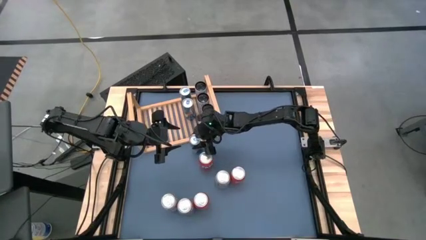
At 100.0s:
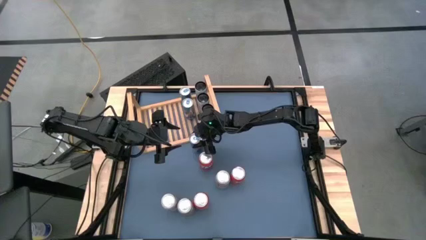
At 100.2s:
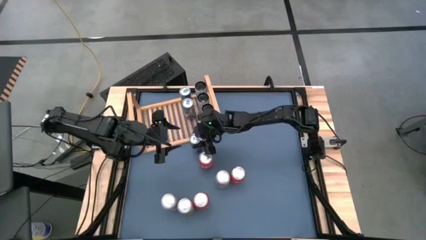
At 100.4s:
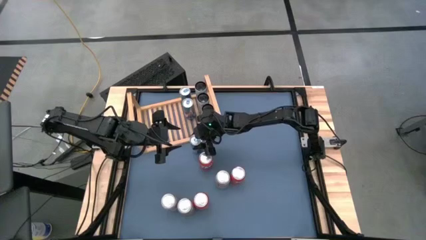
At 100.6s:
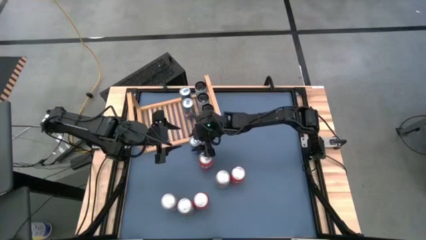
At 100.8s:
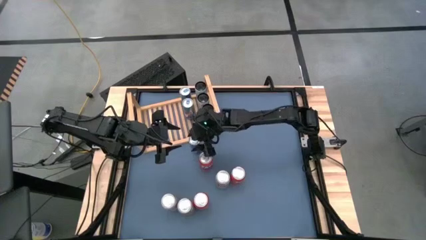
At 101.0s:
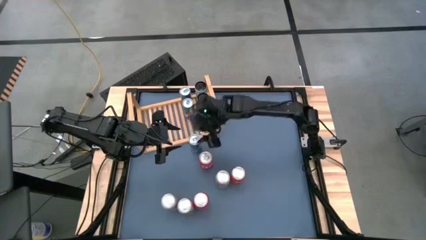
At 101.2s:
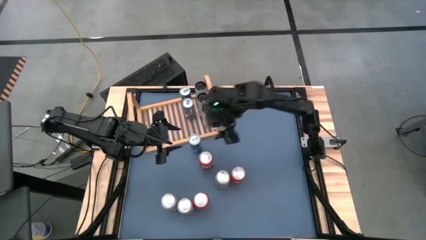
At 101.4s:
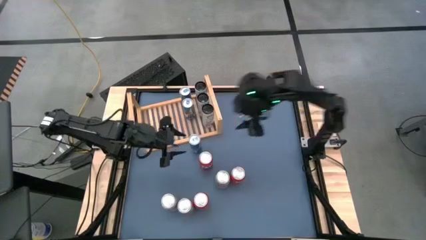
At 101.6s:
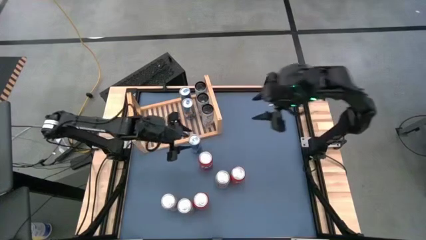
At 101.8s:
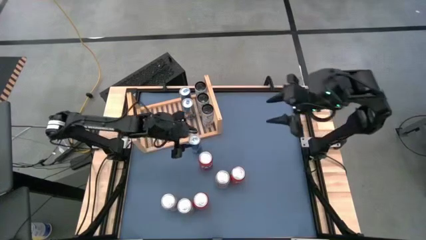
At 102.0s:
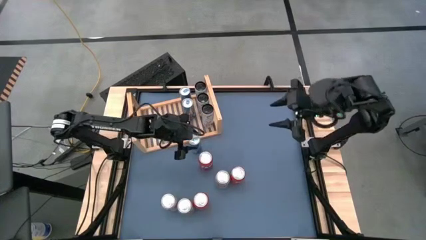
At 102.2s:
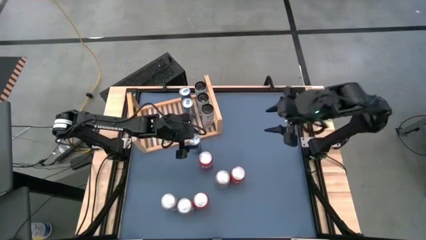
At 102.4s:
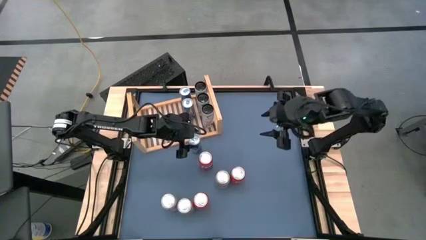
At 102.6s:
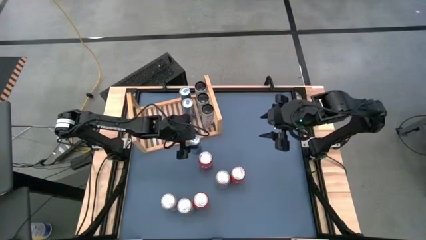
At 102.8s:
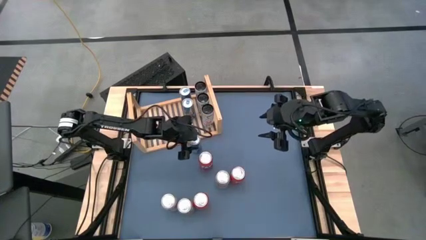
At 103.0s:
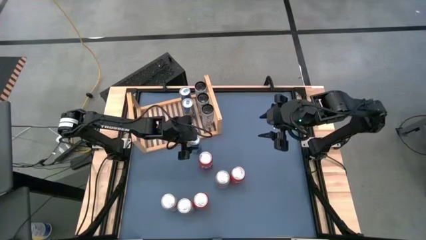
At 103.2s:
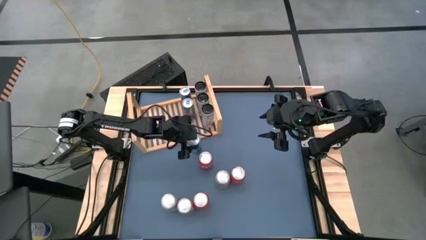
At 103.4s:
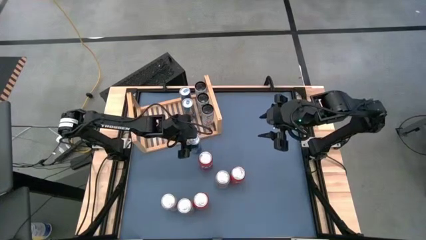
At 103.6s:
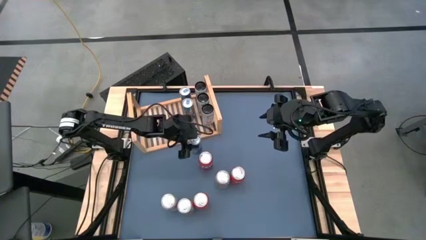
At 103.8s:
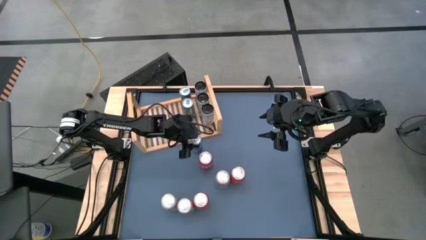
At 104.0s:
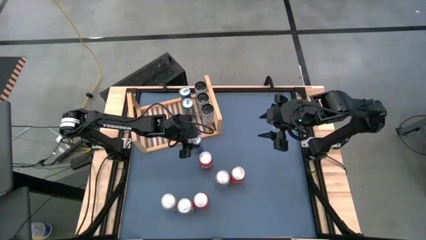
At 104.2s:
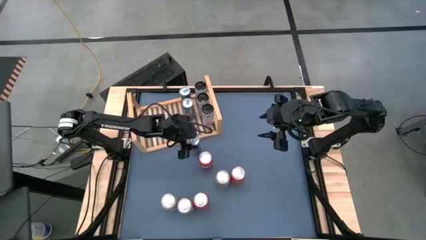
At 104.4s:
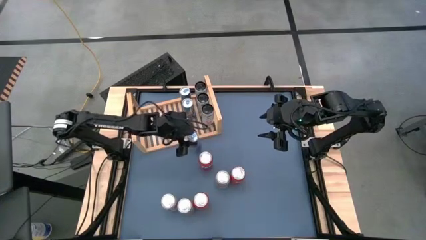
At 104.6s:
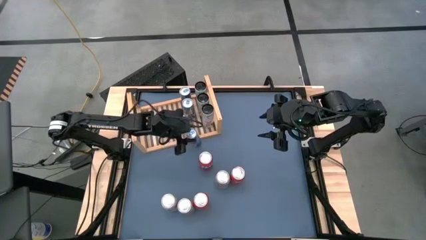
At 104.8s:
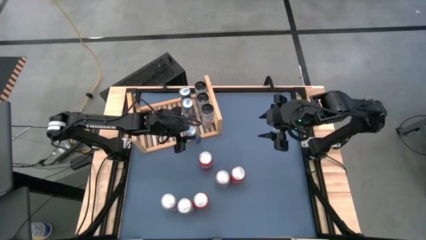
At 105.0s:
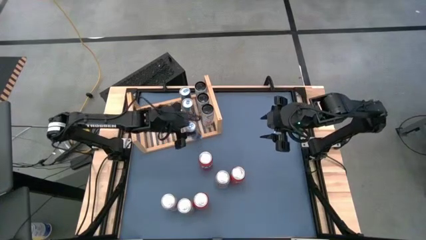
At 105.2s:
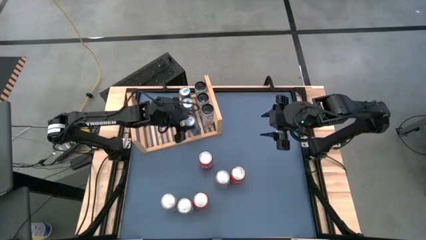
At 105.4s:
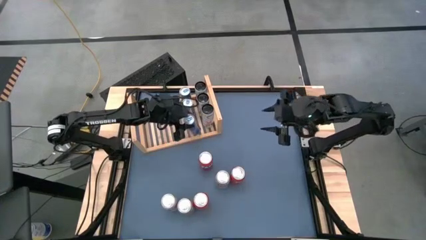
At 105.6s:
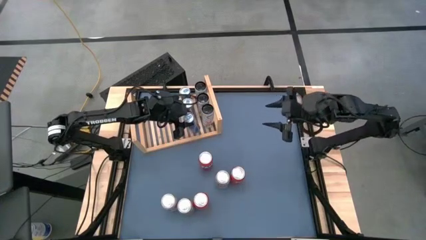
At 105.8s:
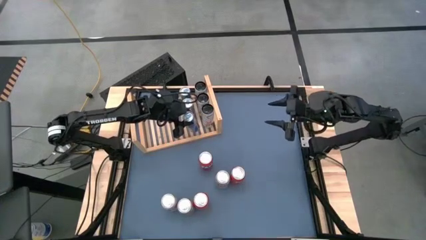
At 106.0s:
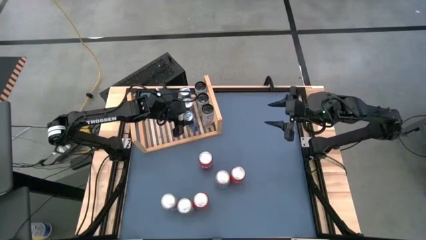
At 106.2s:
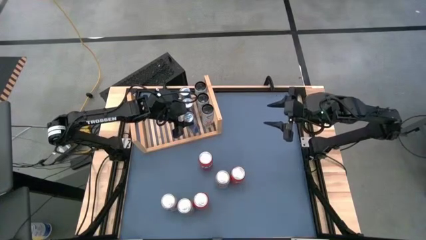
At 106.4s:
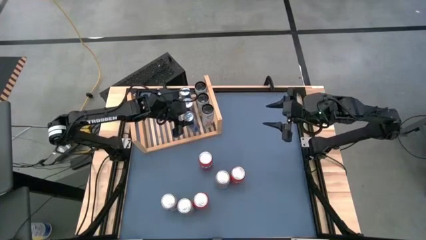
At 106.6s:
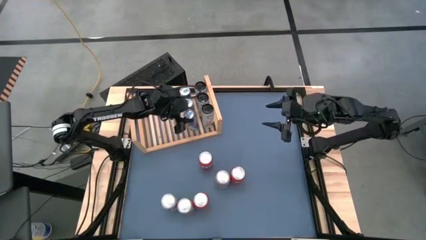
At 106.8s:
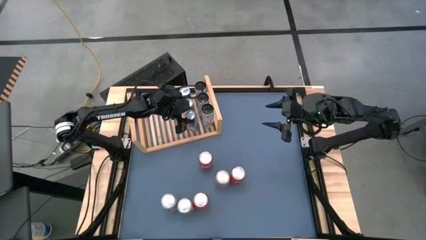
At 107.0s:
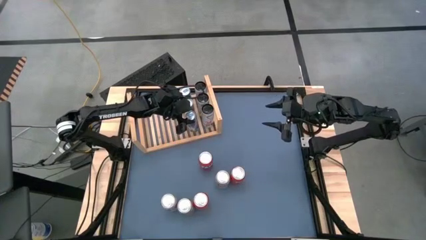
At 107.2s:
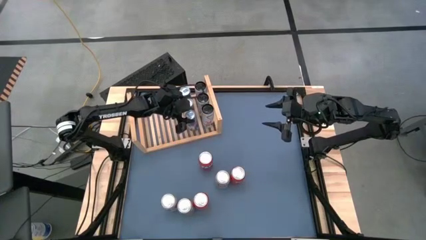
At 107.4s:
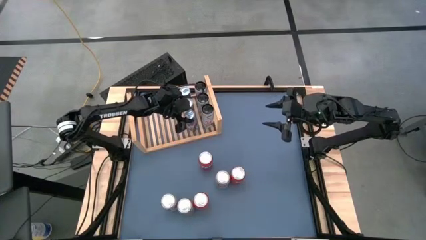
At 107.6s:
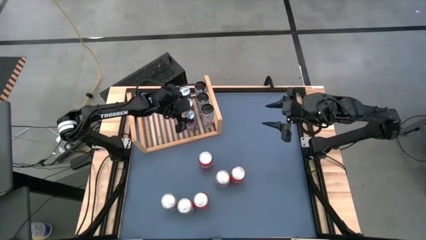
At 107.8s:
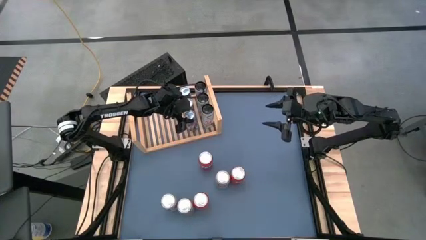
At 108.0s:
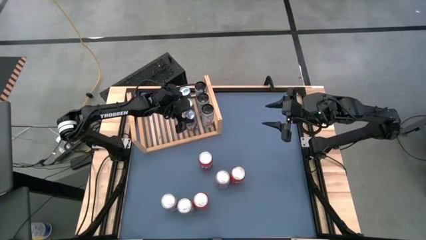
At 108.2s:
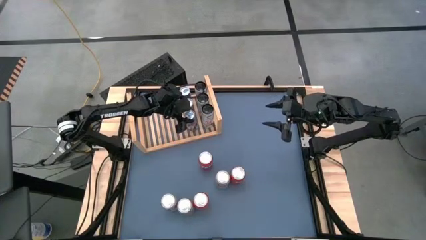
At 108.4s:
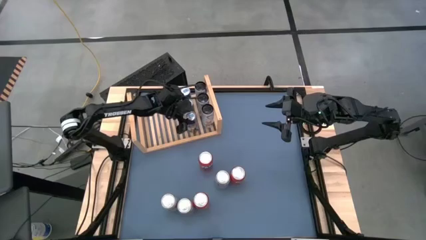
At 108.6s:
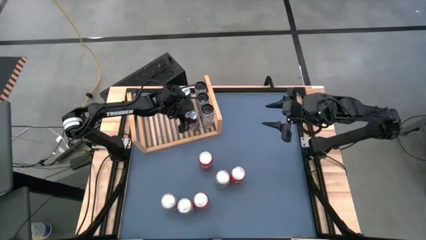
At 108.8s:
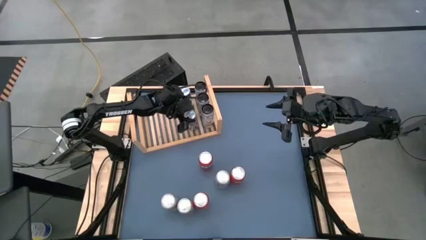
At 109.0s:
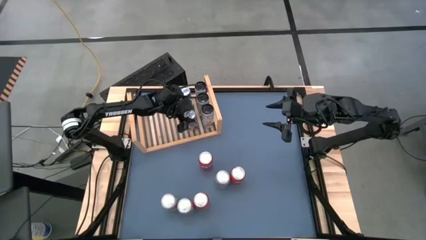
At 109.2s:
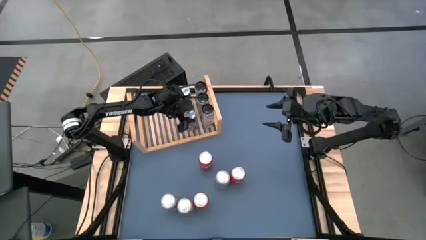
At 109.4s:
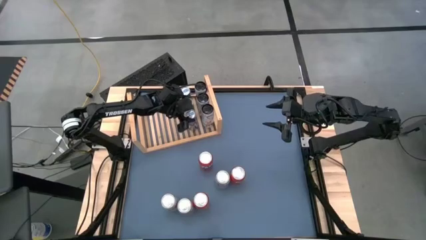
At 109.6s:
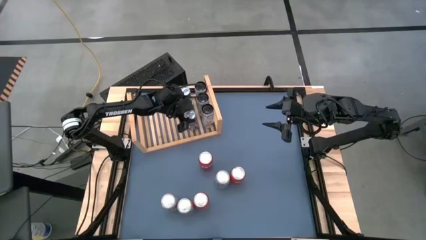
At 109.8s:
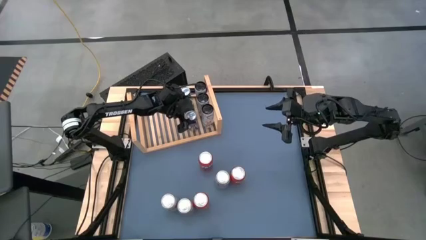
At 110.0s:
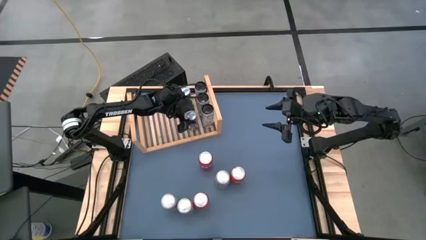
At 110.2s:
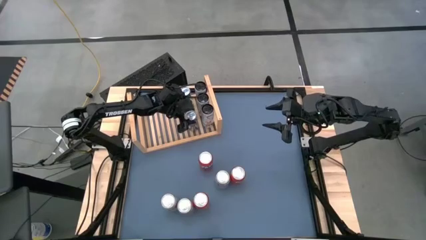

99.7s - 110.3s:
Task: Place canned beverage on shelf
Put the blue soda can on the shelf aligned with the other blue soda cans

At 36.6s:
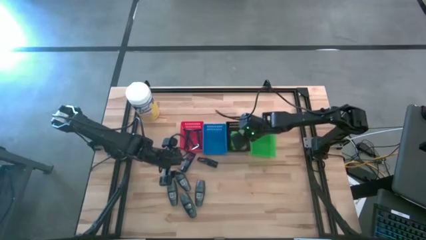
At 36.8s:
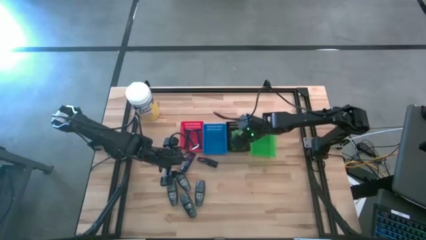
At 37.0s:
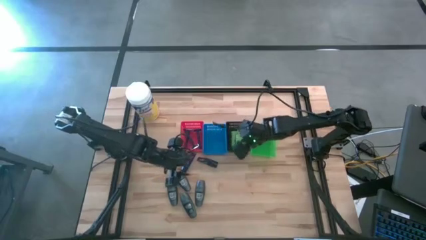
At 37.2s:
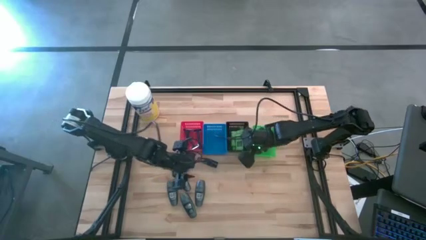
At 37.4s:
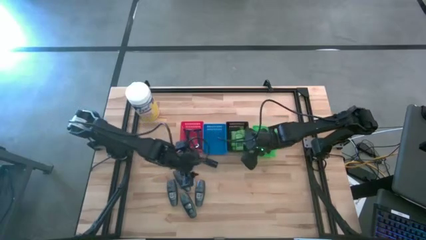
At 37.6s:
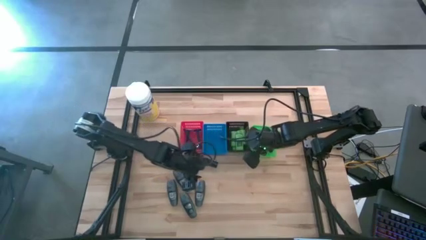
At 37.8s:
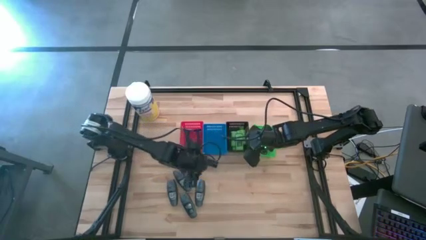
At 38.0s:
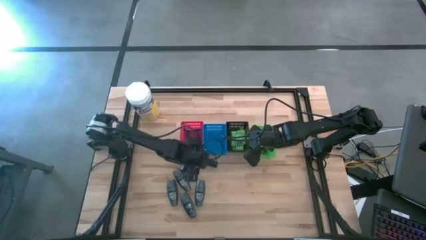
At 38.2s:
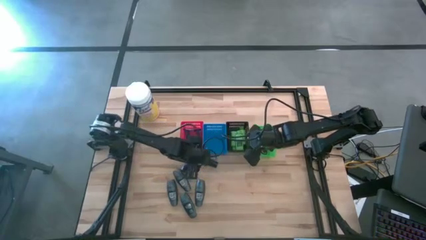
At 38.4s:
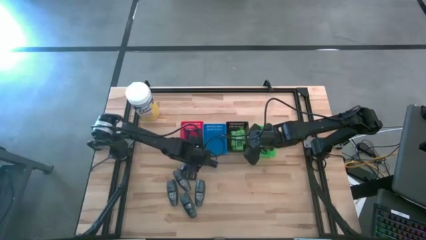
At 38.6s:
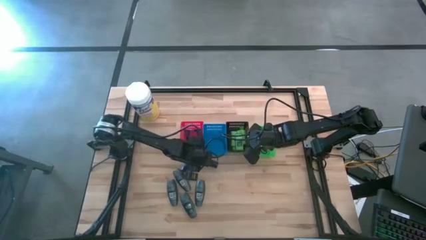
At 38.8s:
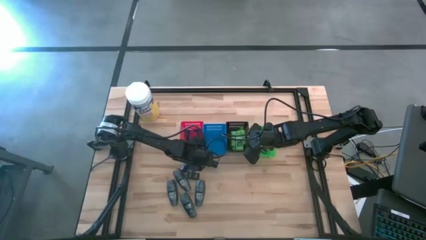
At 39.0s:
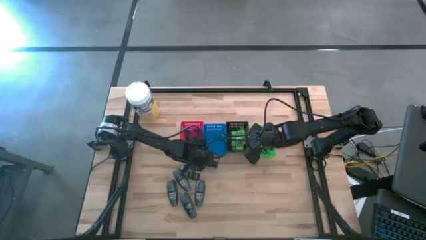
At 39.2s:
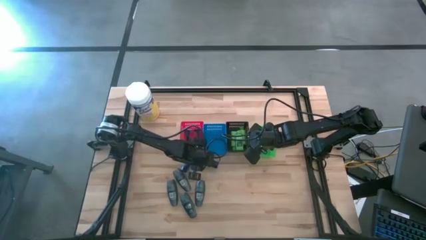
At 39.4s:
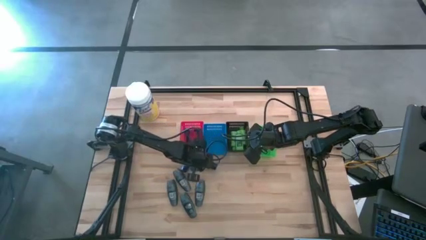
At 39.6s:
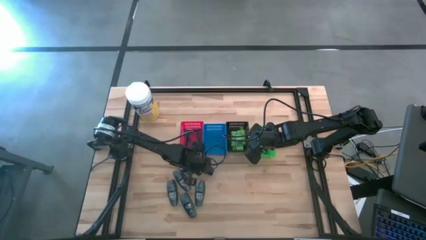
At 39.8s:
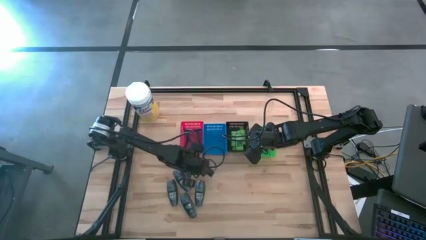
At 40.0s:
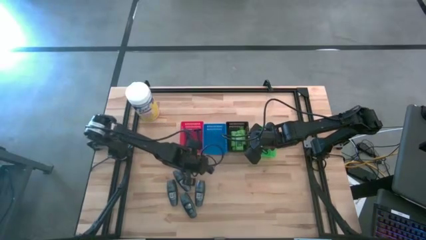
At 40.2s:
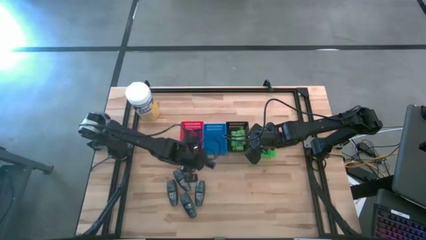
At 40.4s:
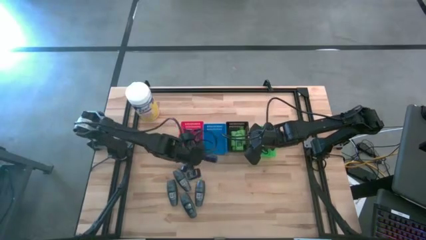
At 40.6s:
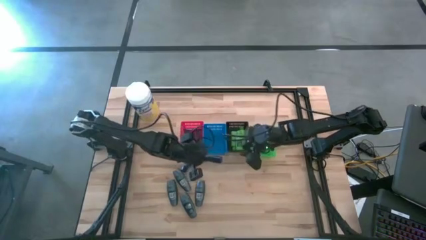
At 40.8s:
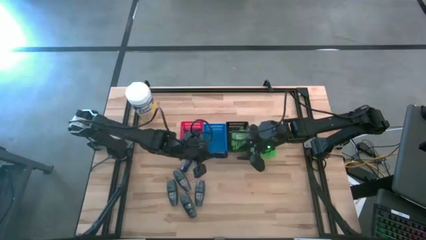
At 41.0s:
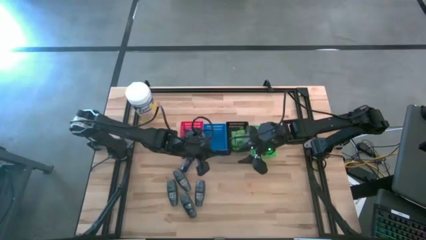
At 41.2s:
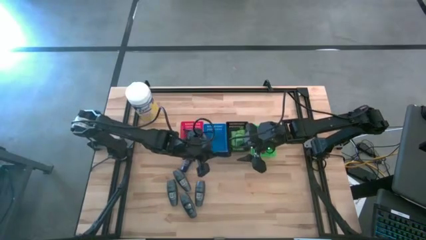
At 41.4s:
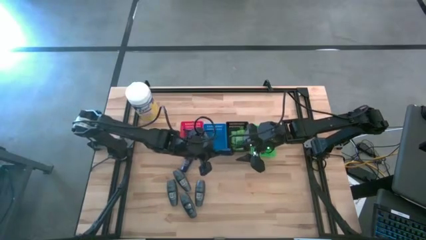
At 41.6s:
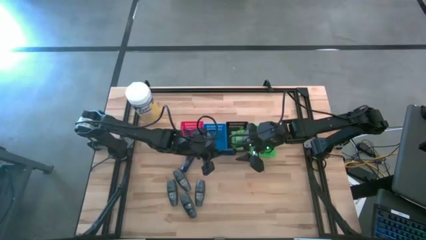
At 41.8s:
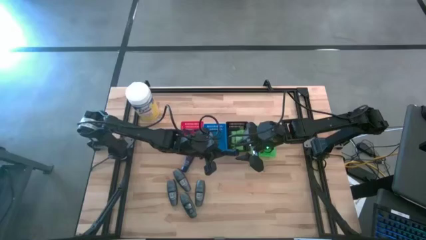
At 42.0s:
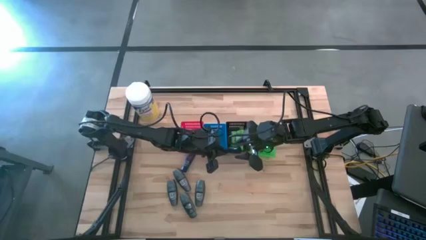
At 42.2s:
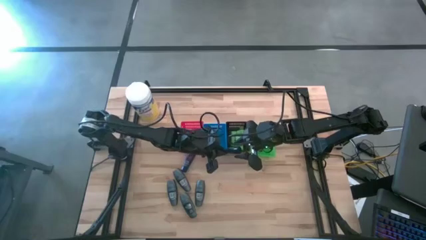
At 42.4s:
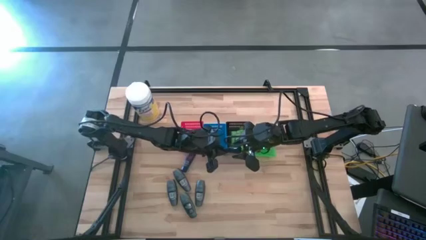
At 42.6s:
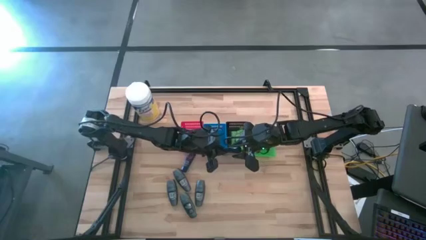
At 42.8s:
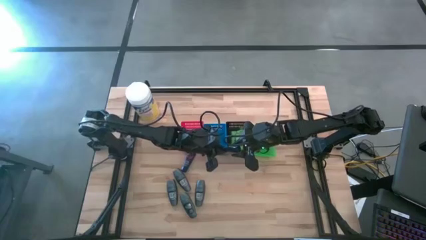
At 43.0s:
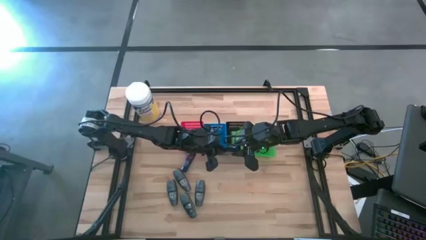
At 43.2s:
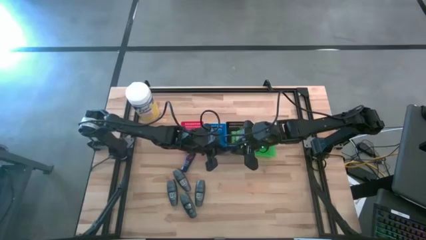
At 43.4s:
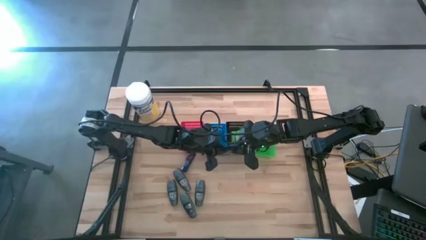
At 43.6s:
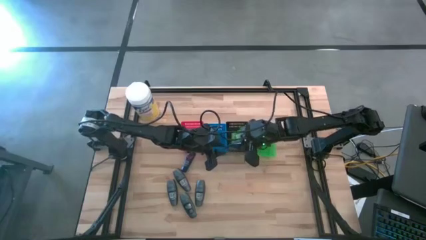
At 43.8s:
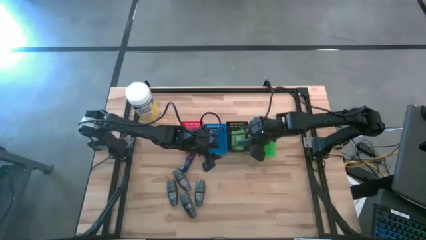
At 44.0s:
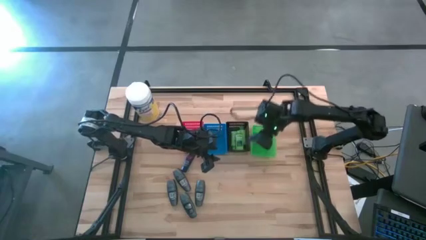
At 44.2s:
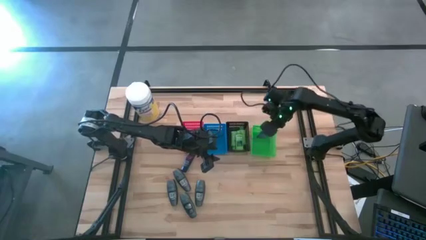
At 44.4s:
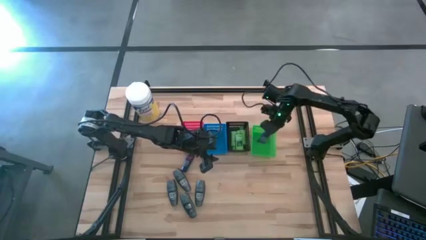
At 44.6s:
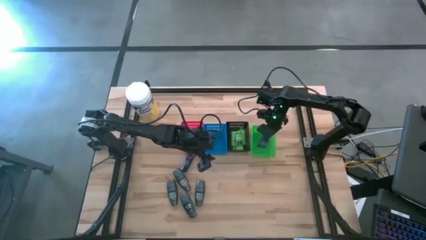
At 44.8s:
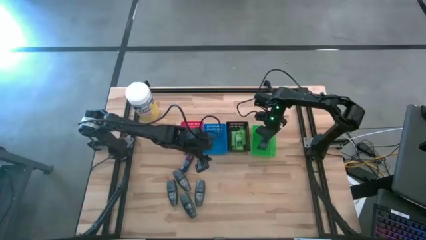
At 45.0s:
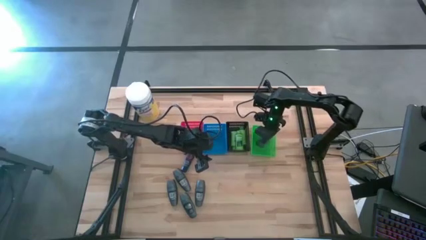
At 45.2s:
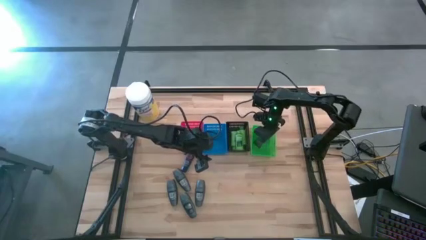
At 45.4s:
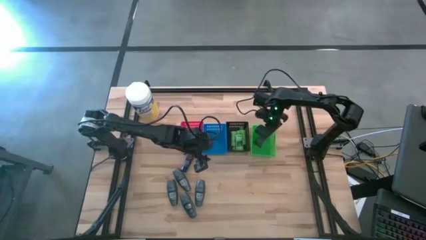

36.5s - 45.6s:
Task: Pick & Place Travel size toiletries
Put the shaving cream into the green basket
